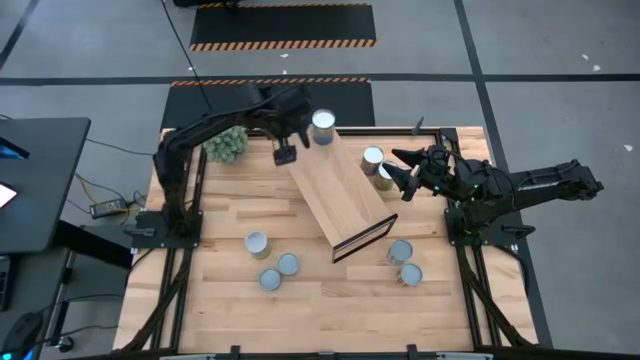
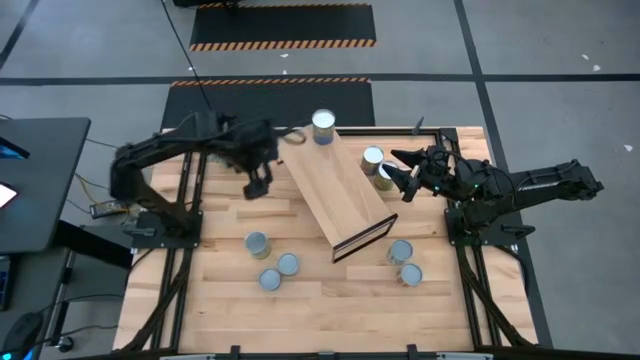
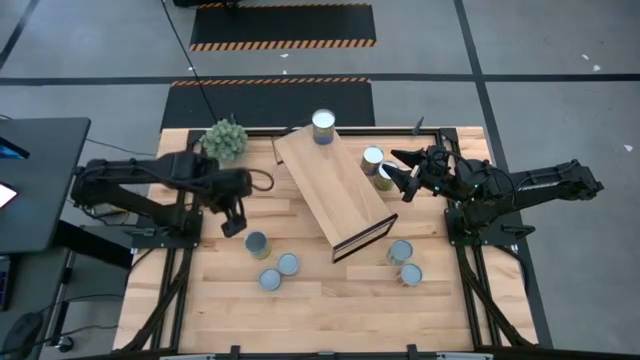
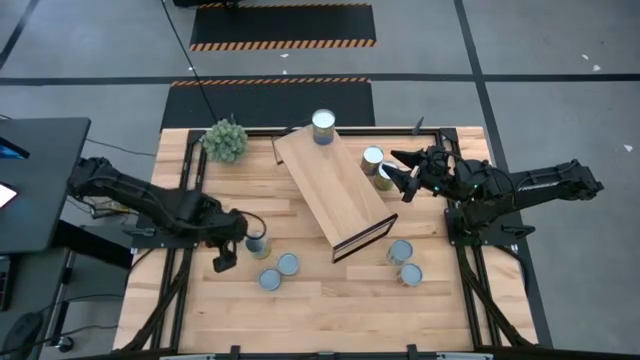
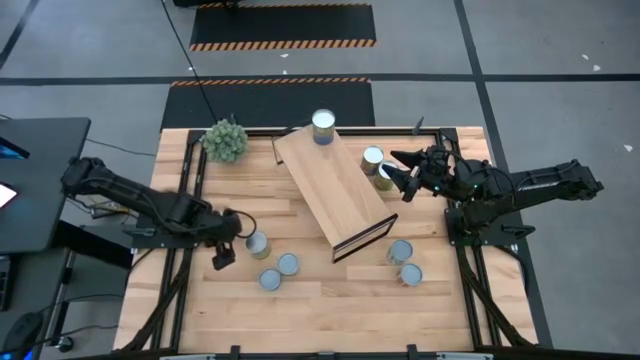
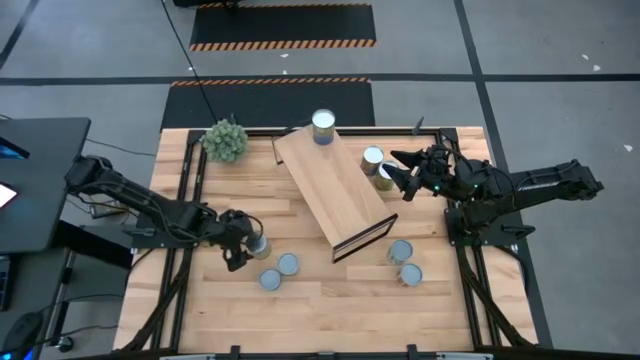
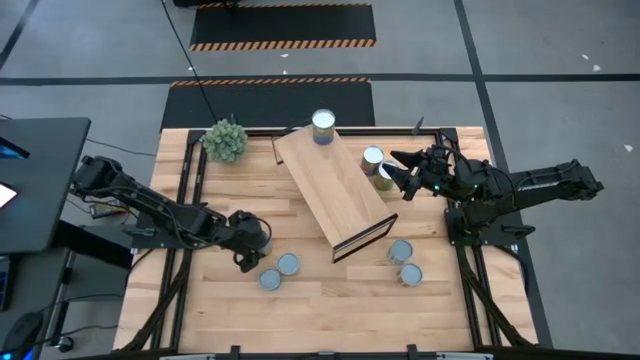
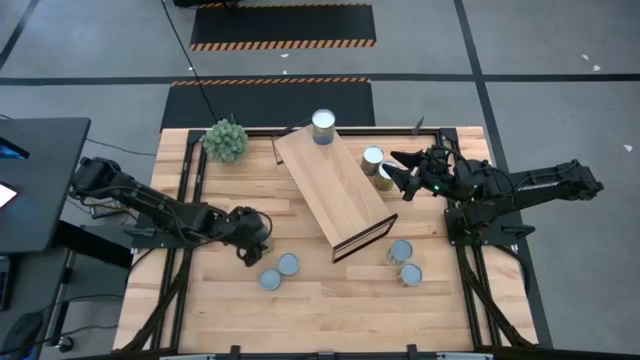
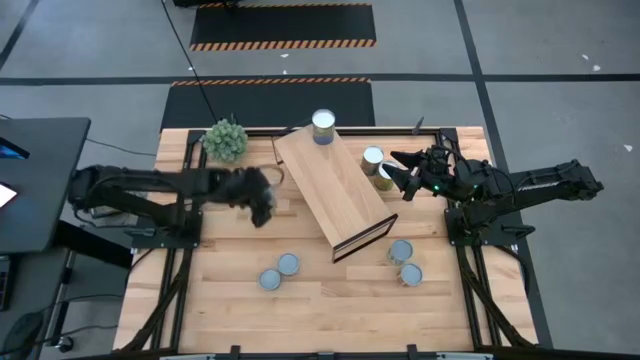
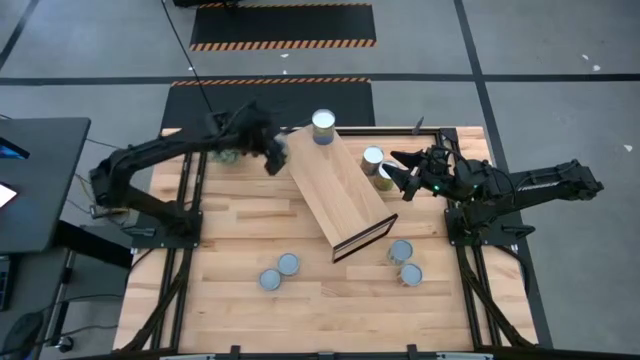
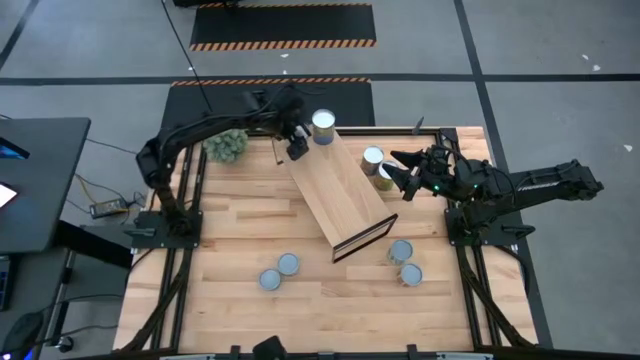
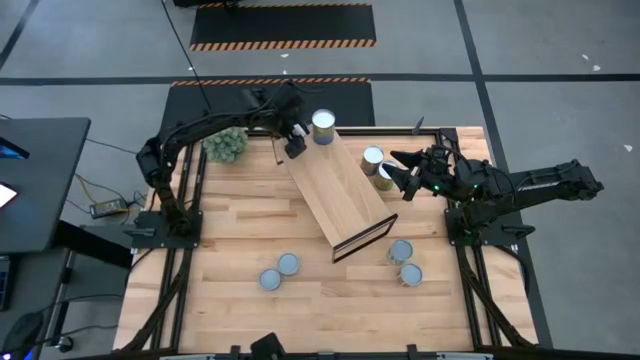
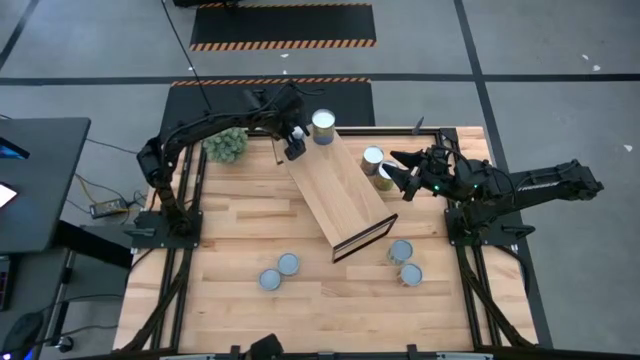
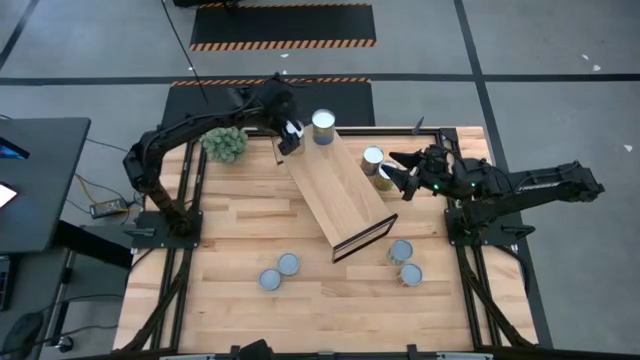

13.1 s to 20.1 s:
Task: Pick and place cans onto a shelf
Put the canned carrots on the shelf

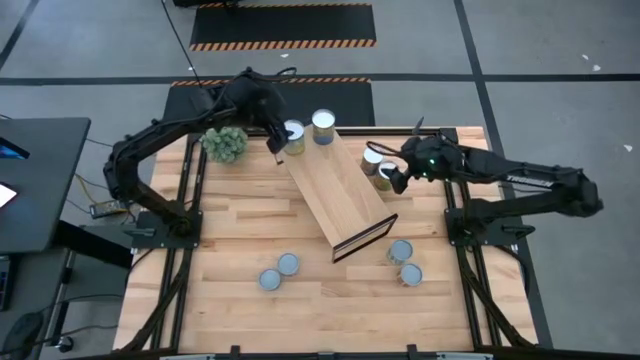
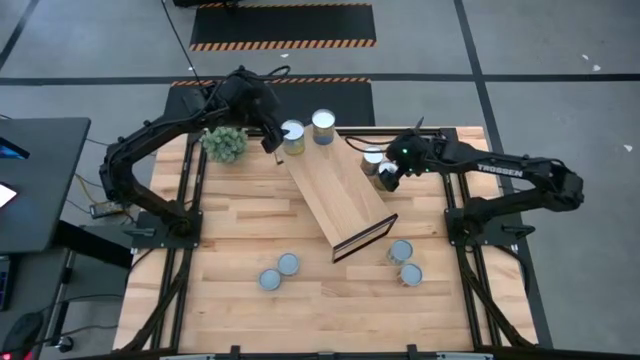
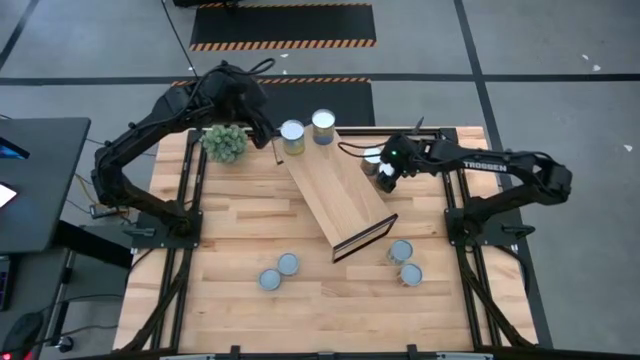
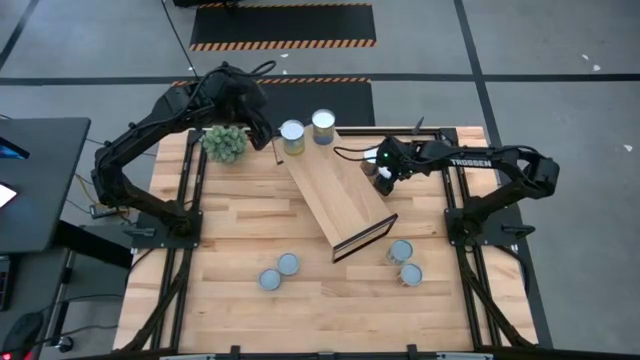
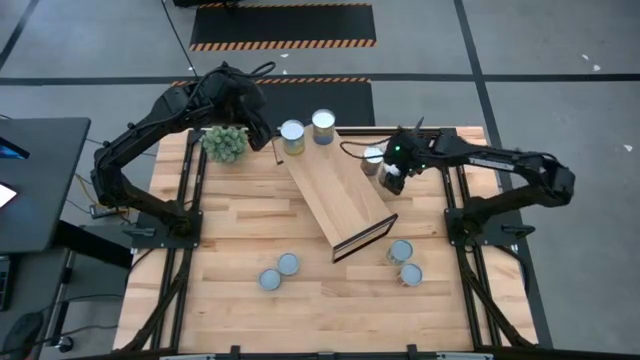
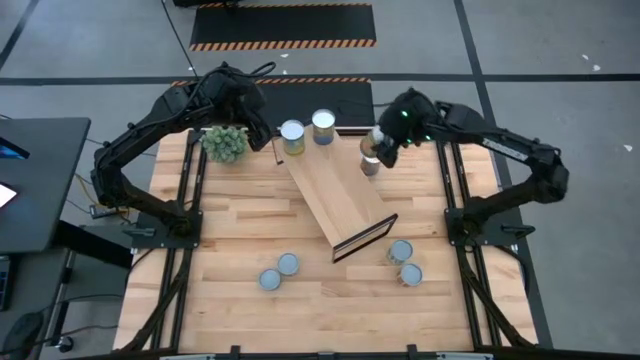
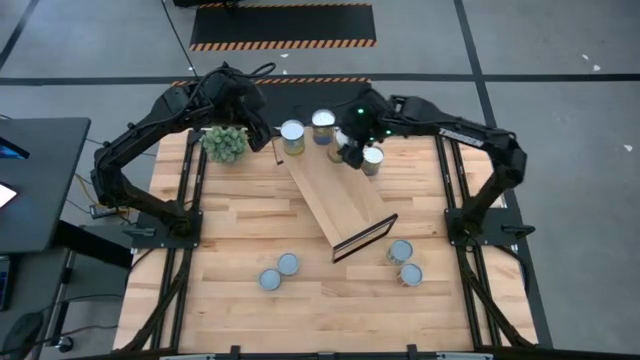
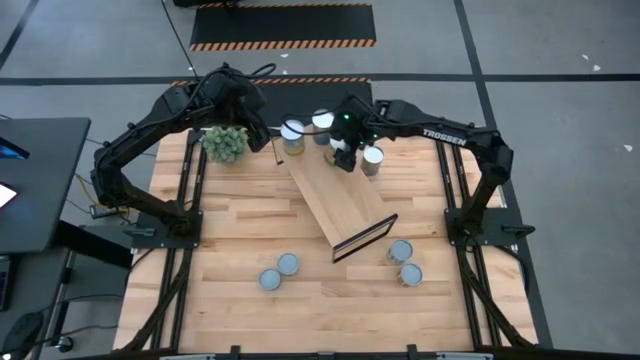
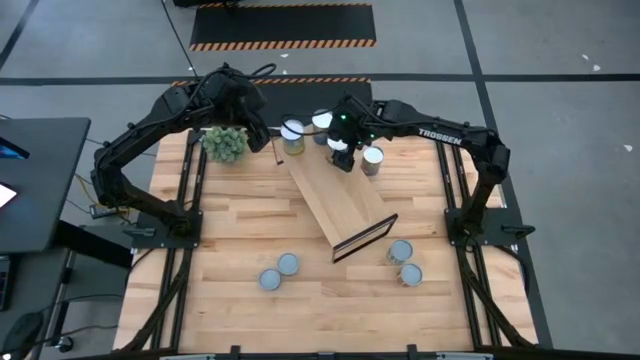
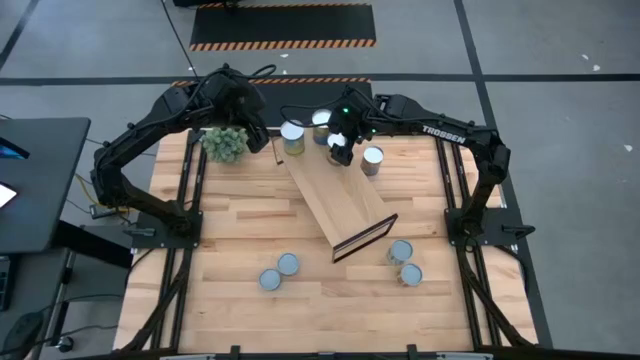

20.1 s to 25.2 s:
Put the canned oranges on the shelf

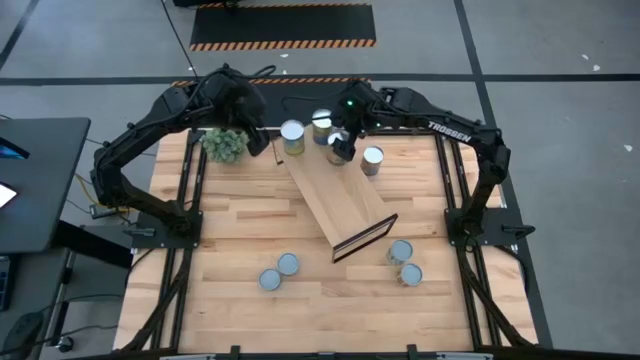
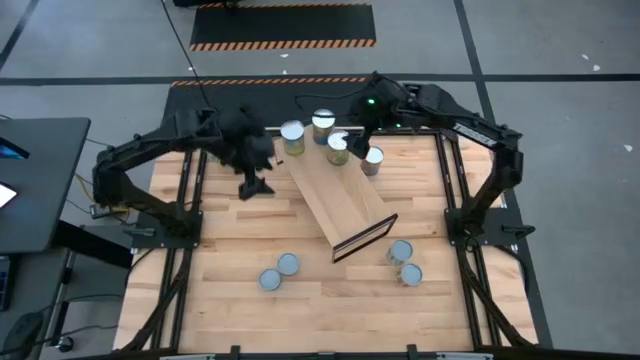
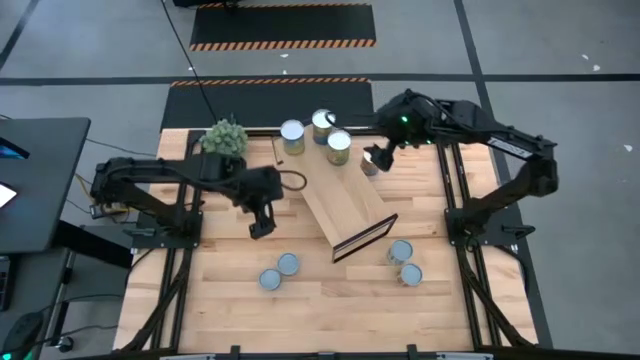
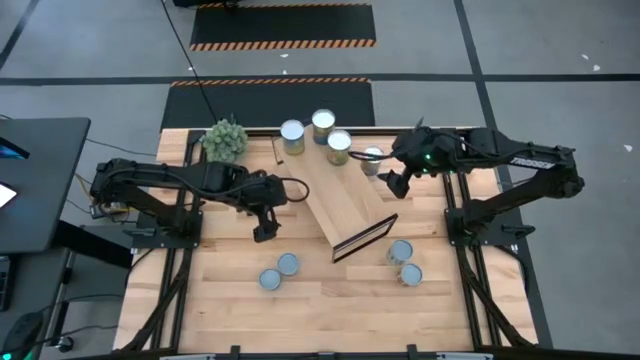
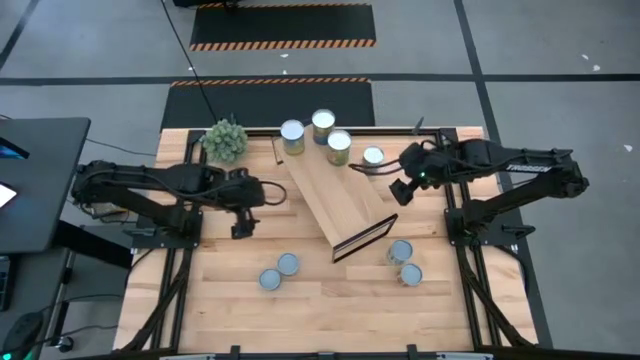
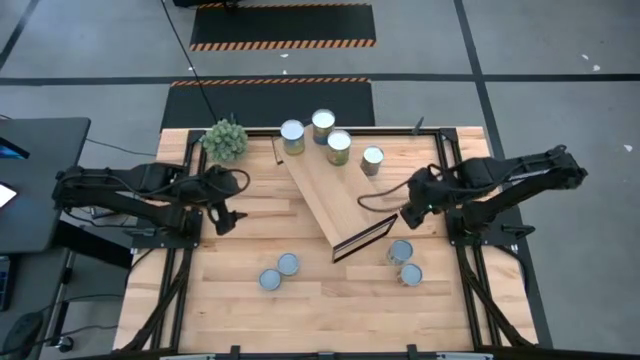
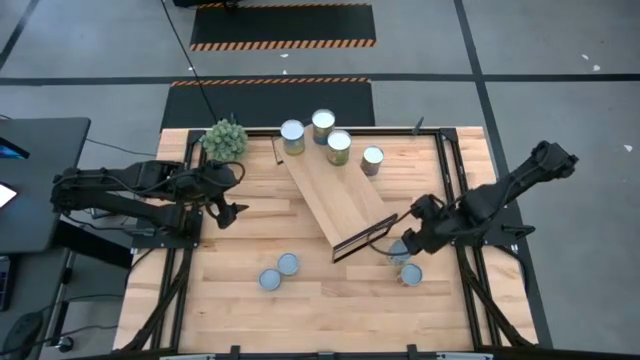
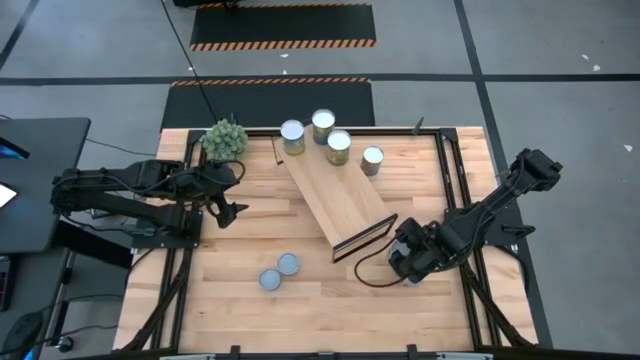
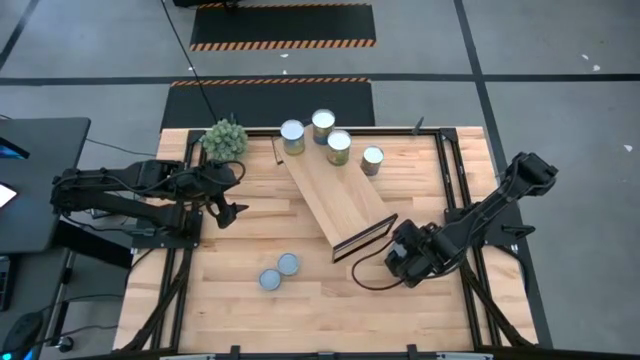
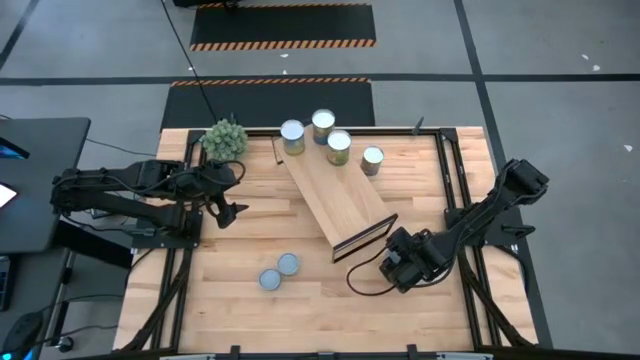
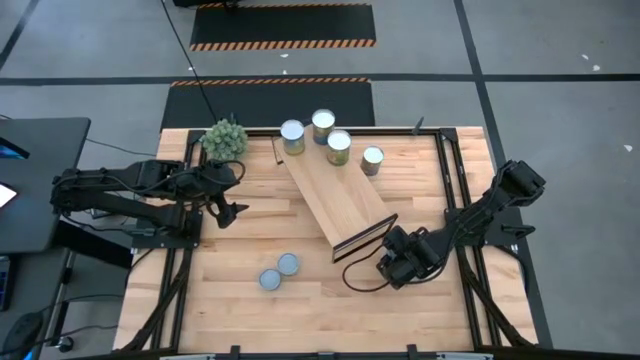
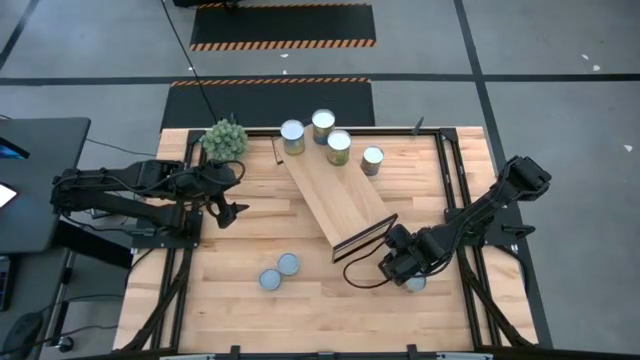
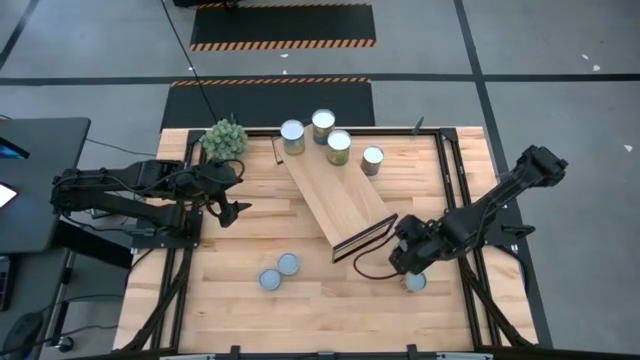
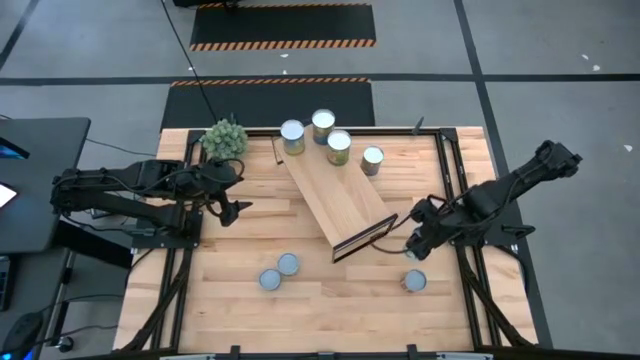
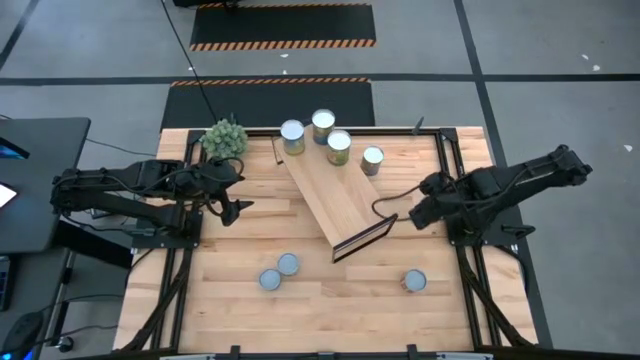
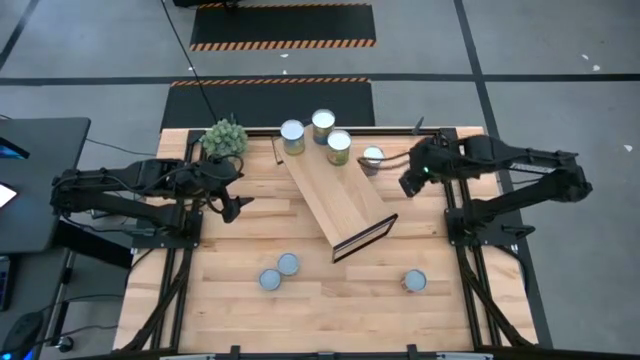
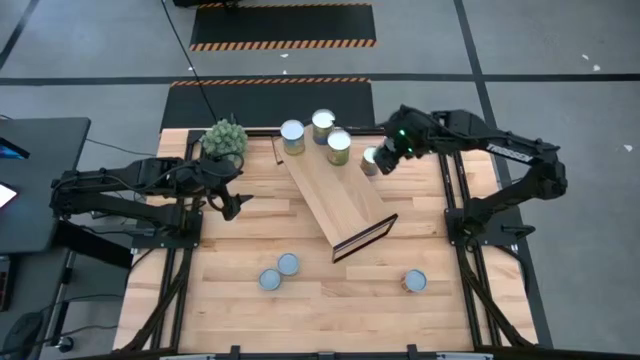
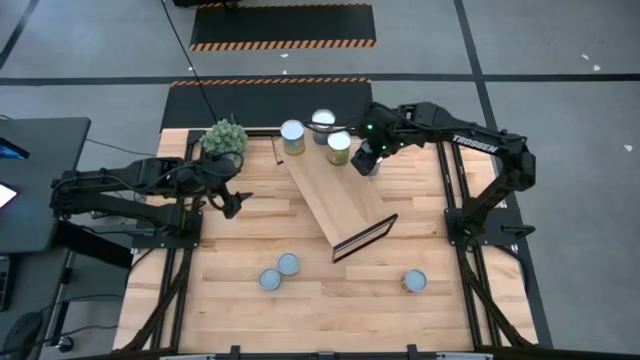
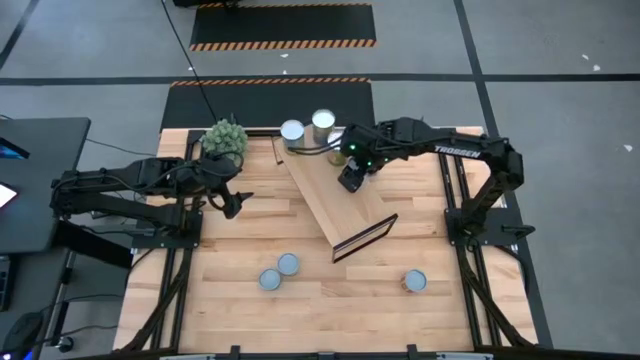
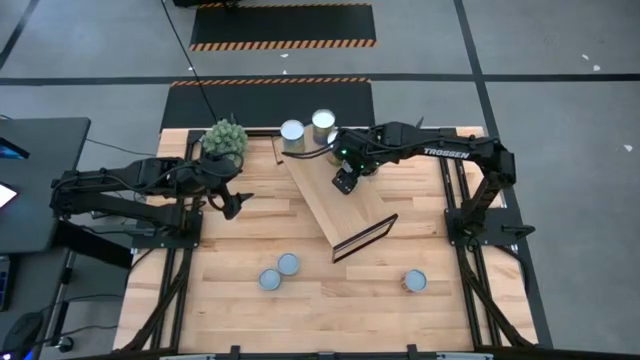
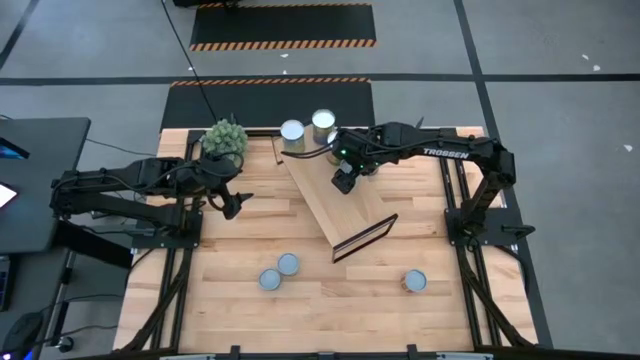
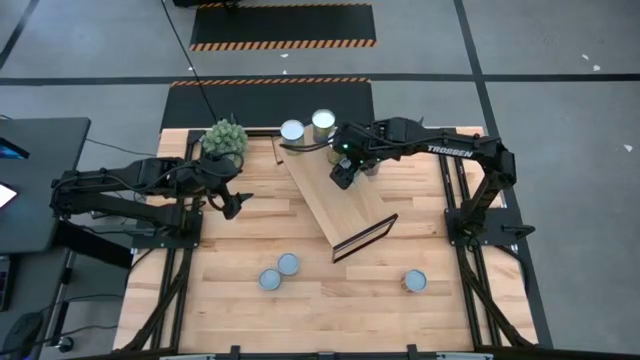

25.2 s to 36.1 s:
Put the canned mix vegetables on the shelf
